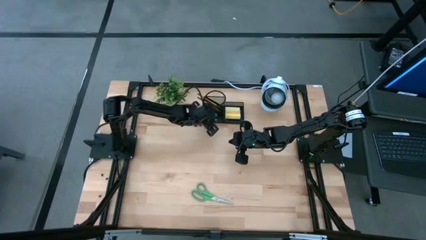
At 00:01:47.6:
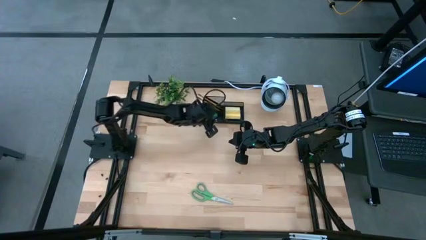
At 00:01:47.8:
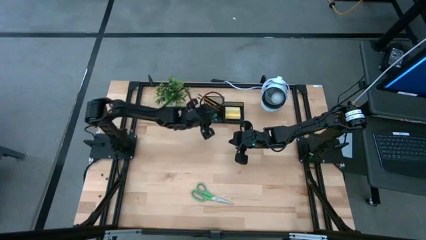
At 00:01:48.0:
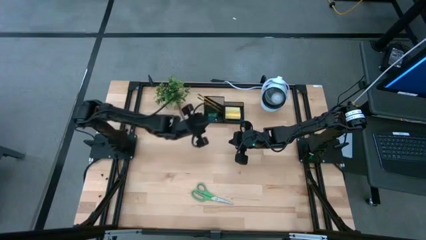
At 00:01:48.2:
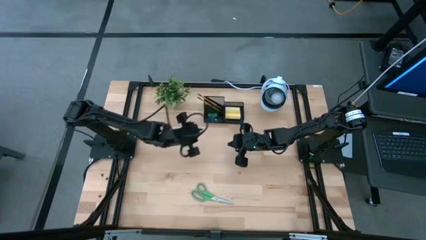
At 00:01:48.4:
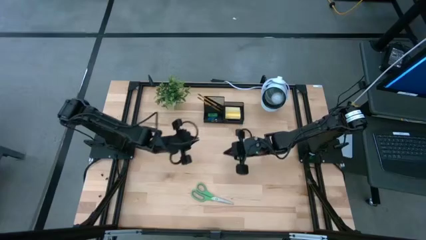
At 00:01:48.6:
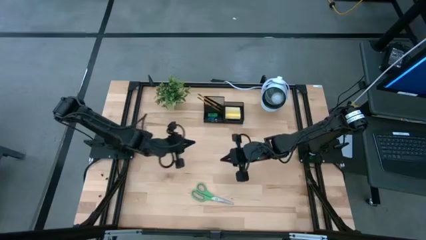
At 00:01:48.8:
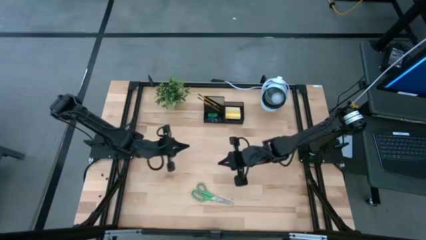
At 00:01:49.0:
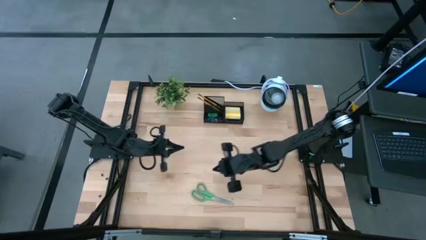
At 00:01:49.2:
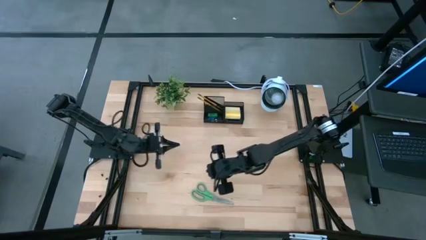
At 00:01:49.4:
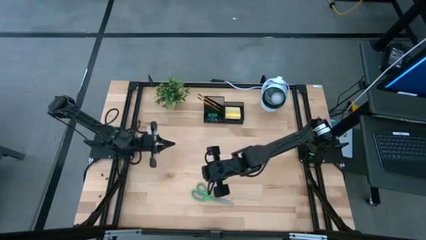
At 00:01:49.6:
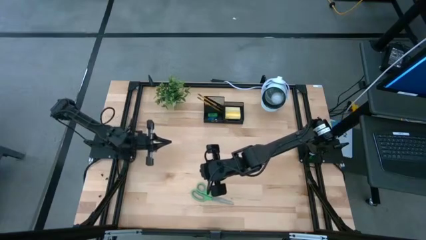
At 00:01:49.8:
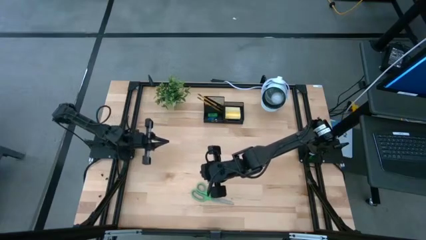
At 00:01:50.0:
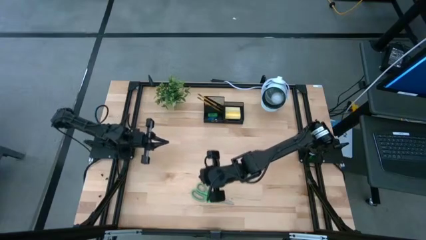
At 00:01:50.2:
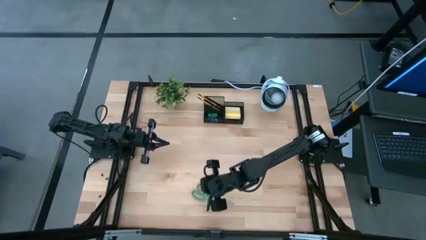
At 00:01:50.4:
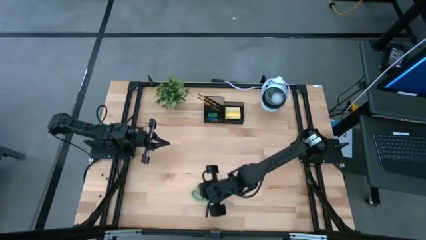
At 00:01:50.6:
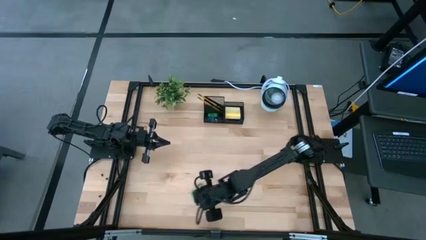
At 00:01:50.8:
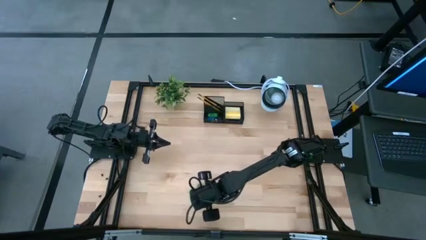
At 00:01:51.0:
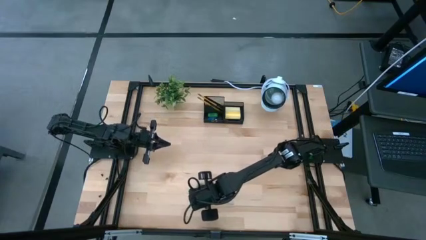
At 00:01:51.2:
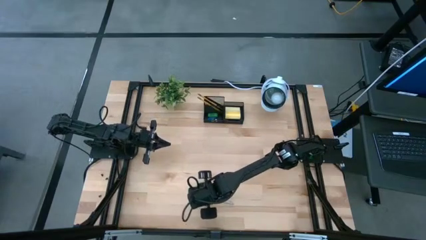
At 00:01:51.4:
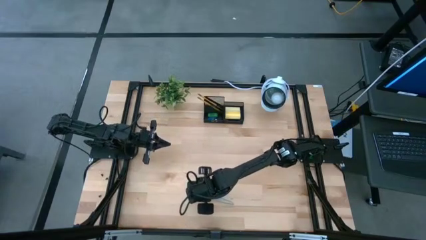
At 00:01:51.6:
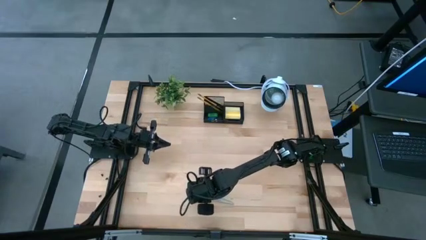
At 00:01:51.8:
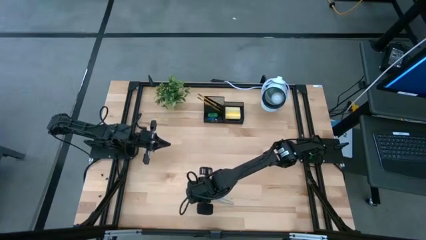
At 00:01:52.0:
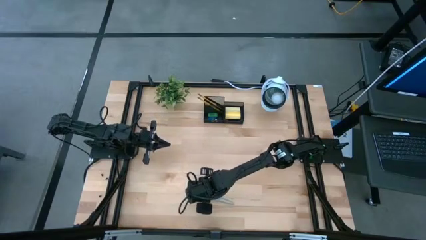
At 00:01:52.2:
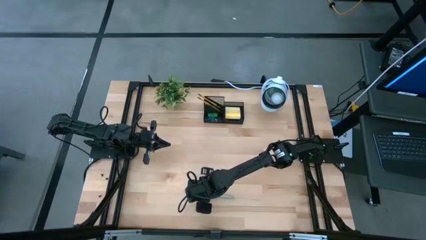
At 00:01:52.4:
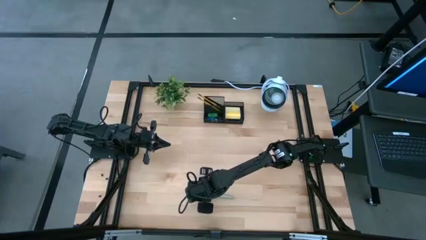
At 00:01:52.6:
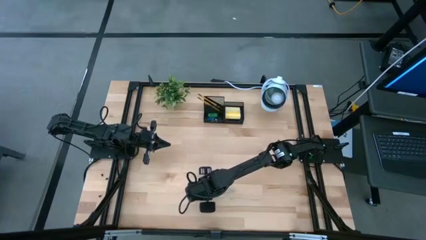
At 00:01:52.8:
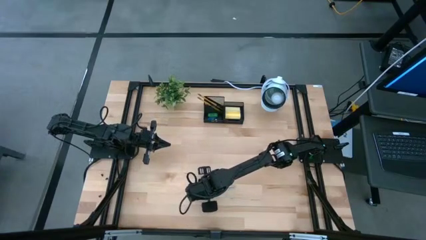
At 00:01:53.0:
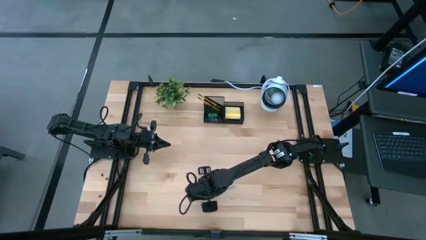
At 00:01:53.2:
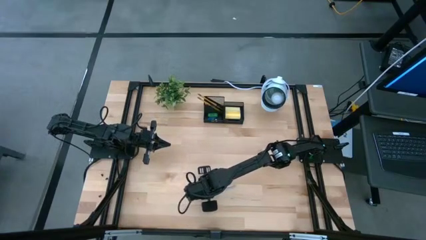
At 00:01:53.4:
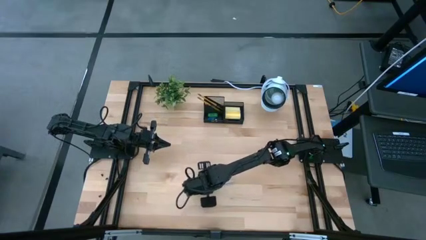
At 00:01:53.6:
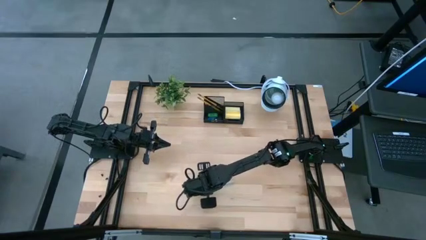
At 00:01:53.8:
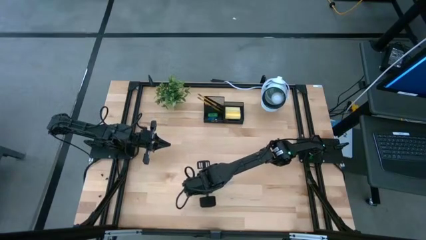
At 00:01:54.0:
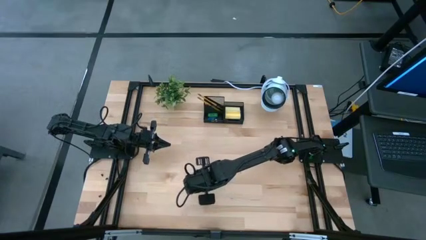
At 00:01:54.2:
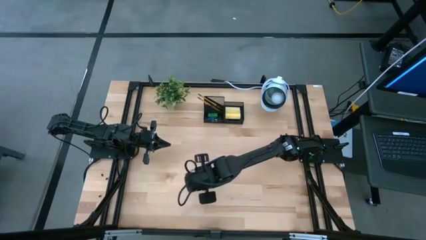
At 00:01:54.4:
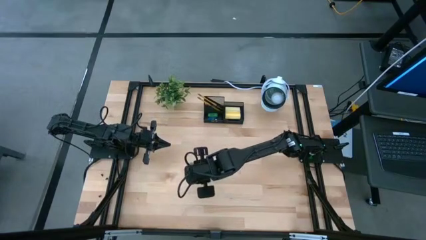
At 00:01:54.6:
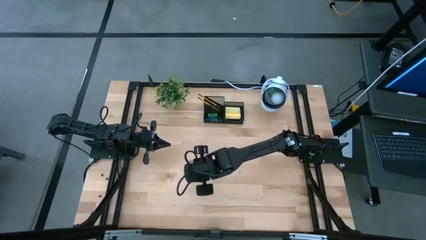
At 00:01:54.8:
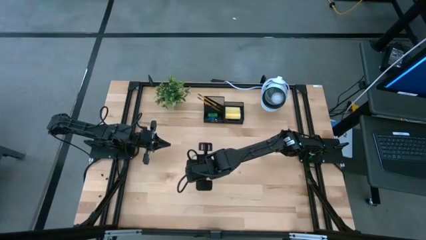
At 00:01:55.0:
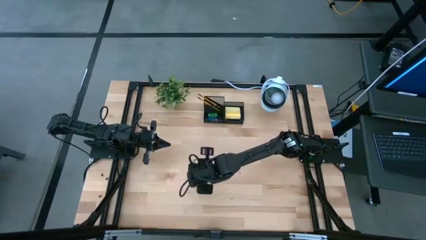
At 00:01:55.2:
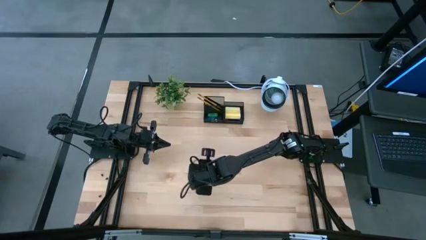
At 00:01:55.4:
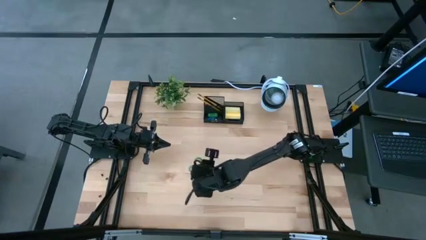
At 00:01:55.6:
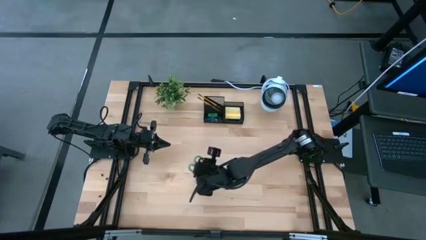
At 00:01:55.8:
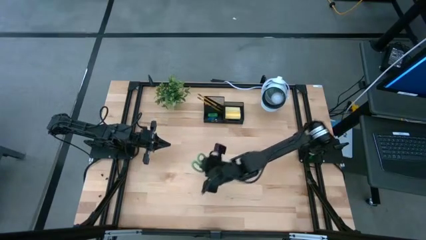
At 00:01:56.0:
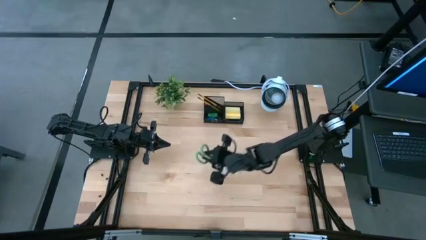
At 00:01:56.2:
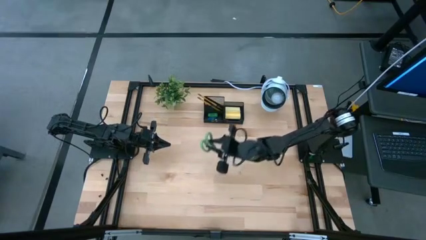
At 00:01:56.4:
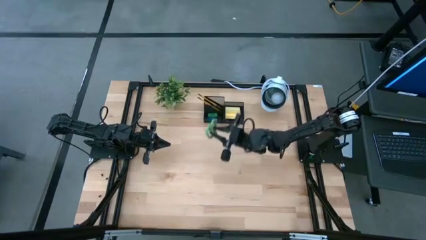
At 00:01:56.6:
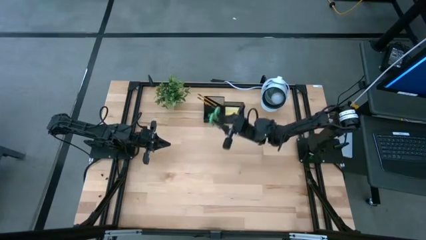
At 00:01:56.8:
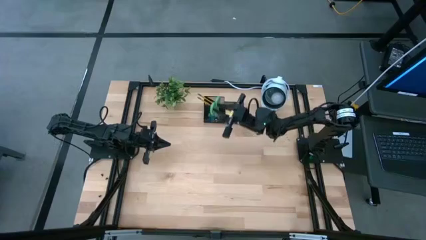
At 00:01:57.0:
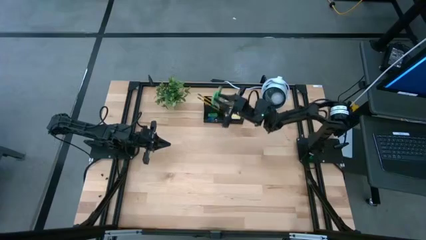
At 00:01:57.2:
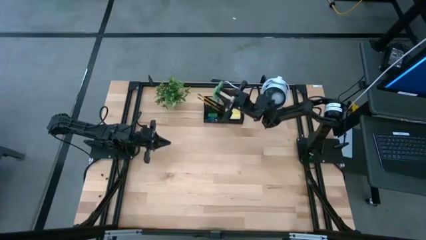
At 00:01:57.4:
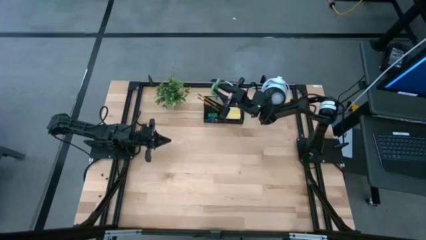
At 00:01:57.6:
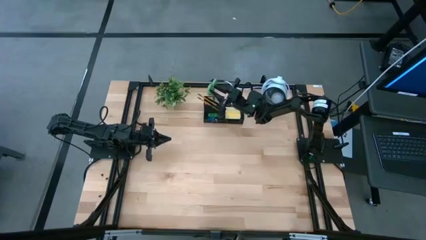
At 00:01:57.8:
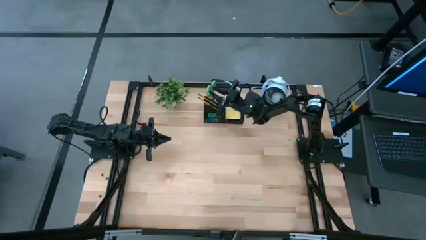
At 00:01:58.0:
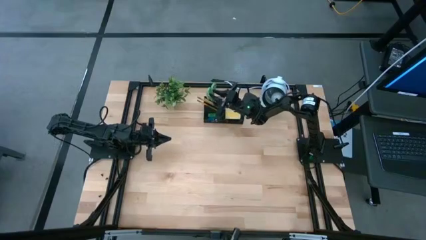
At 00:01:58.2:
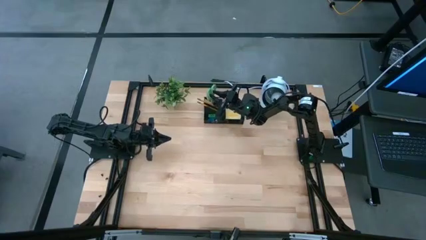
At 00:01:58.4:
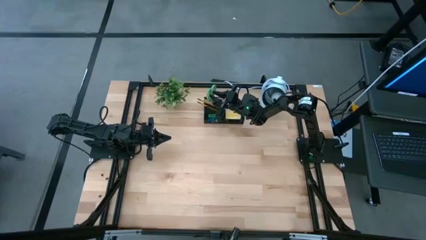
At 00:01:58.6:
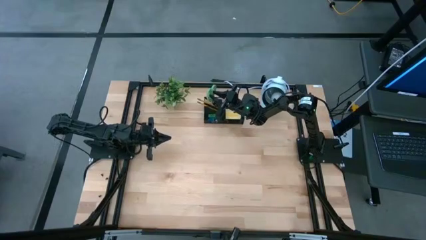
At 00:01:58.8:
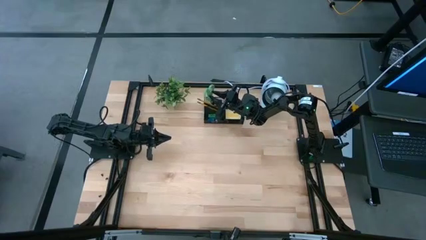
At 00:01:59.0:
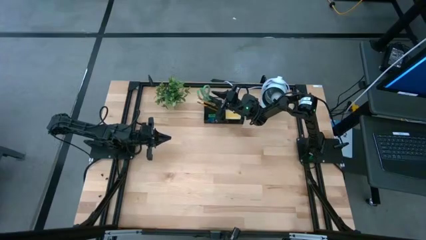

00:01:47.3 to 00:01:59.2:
Task: Pick and place office supplies into organizer
Put the green scissor into the black organizer

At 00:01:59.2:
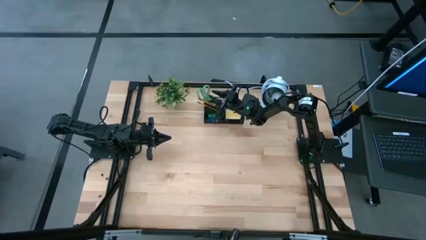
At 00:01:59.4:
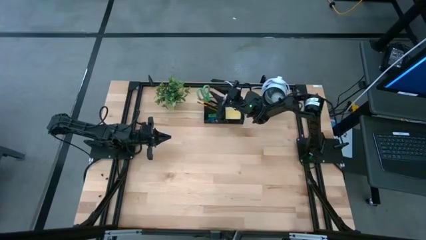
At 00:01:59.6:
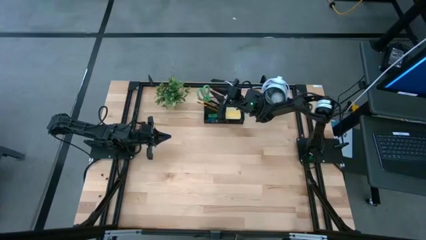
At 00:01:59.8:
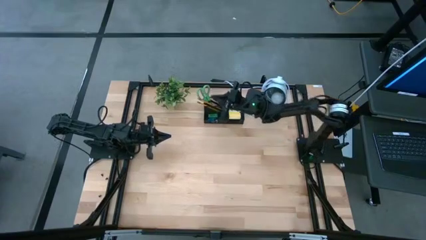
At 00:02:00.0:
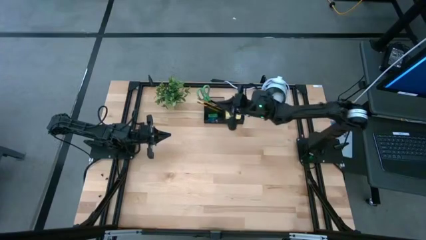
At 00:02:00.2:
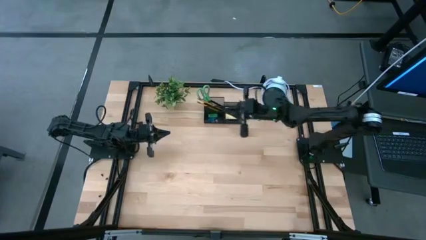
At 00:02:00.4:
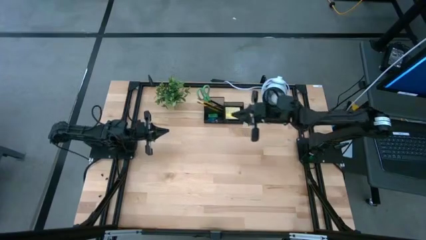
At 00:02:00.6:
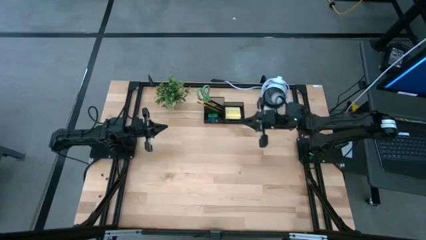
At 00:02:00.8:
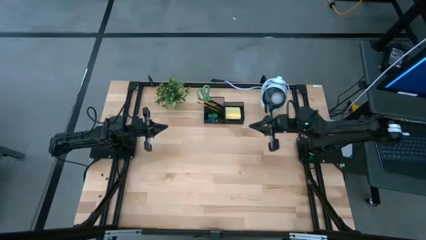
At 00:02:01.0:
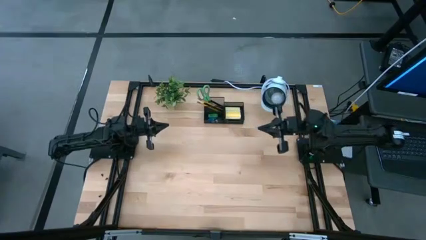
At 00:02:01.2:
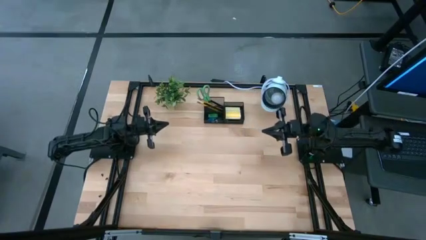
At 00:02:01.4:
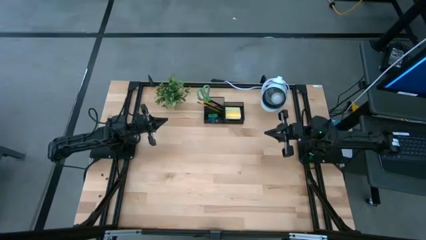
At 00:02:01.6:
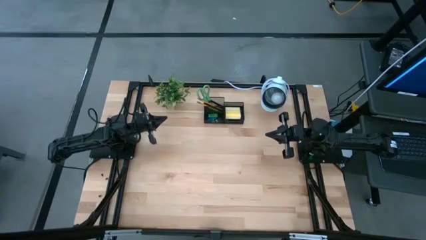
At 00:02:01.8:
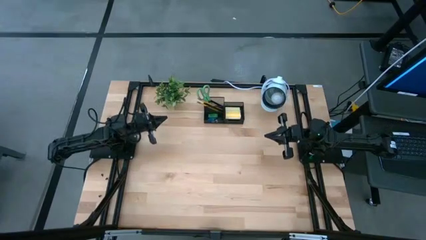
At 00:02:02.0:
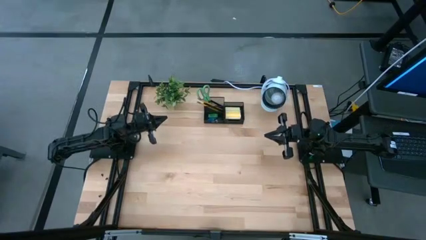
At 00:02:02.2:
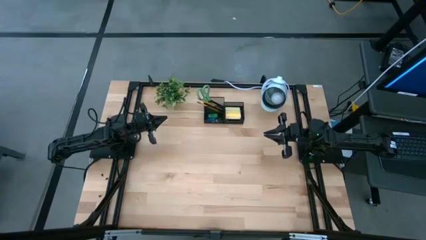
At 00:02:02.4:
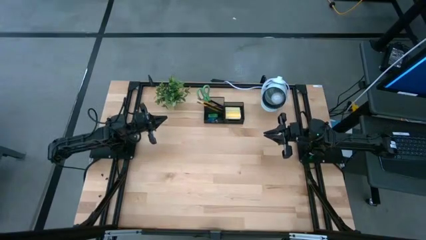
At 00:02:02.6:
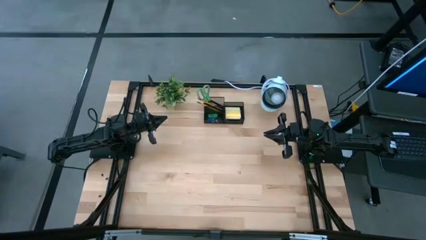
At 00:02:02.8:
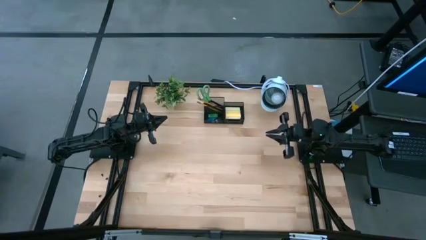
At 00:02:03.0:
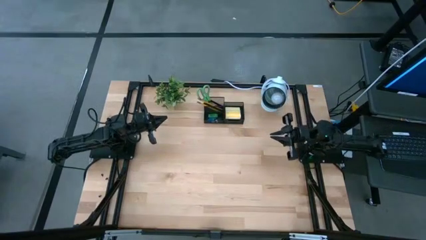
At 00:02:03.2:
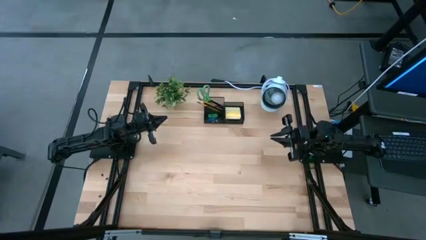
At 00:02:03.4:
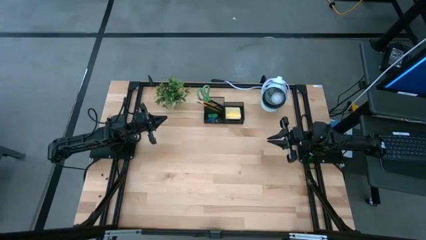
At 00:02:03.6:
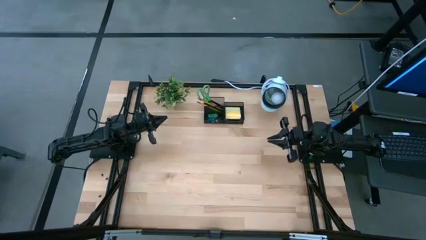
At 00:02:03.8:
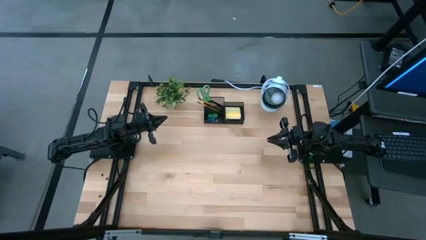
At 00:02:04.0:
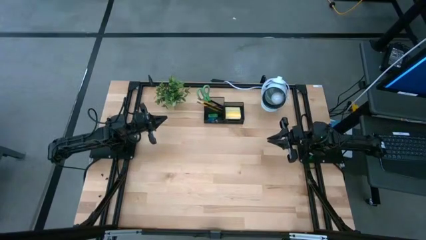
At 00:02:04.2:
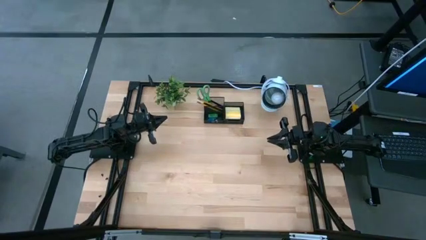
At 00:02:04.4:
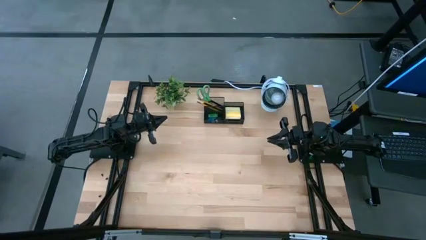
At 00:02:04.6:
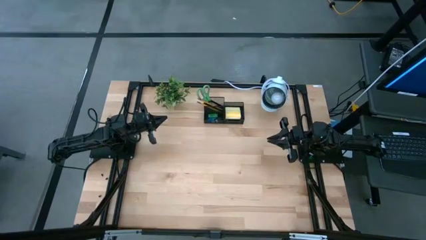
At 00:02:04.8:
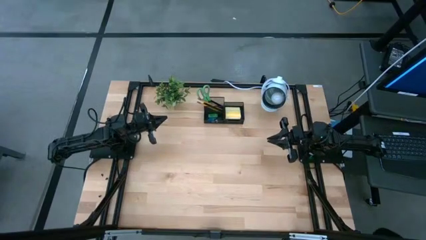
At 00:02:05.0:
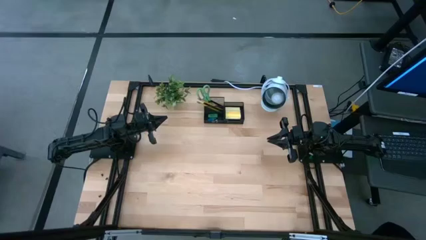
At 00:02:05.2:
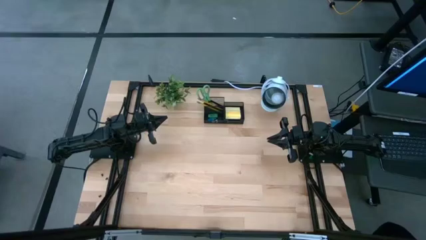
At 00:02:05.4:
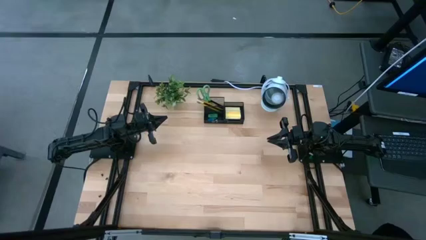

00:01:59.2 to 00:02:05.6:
Return to Home Position
